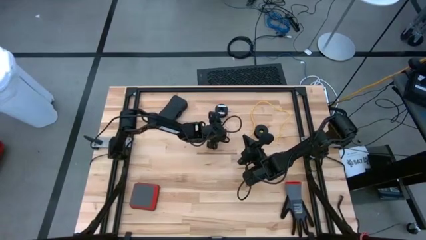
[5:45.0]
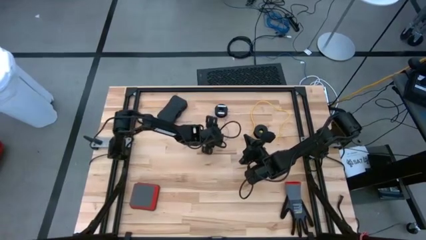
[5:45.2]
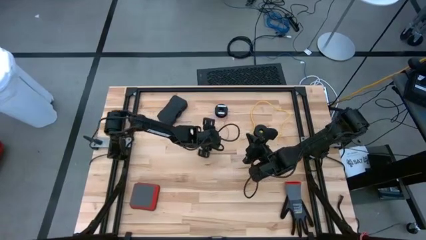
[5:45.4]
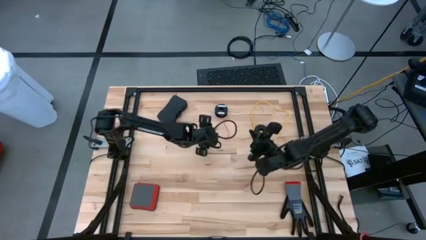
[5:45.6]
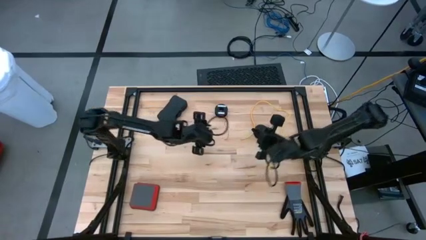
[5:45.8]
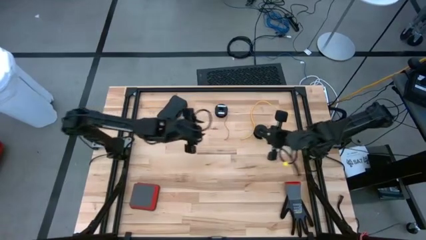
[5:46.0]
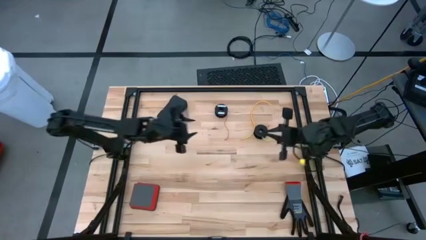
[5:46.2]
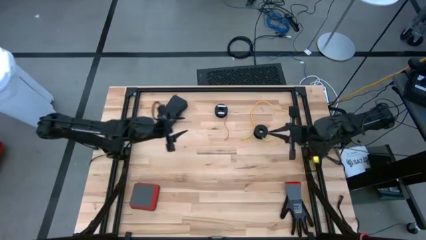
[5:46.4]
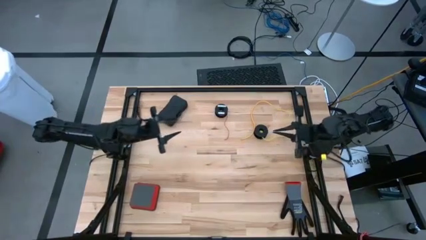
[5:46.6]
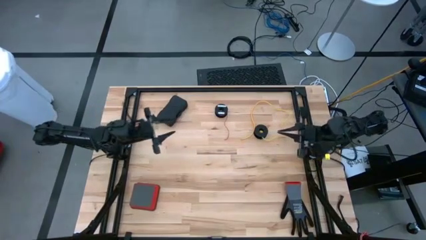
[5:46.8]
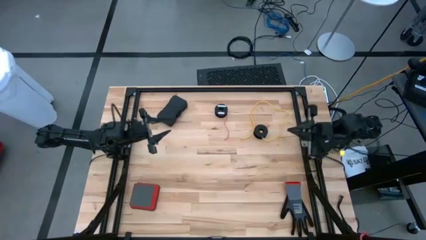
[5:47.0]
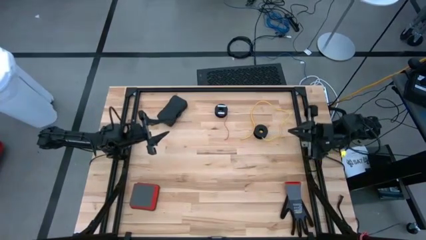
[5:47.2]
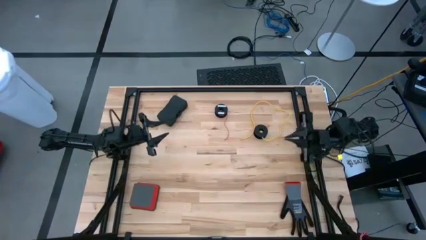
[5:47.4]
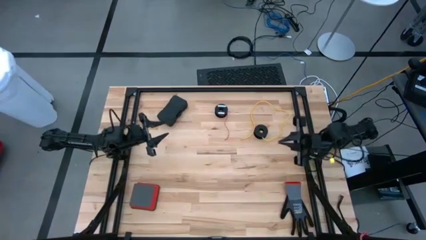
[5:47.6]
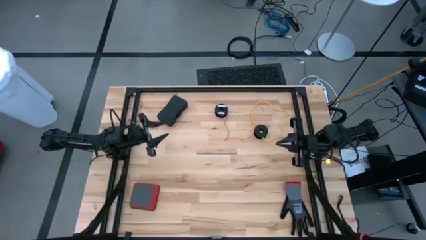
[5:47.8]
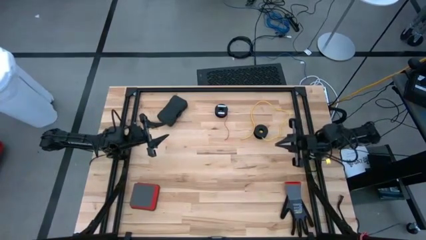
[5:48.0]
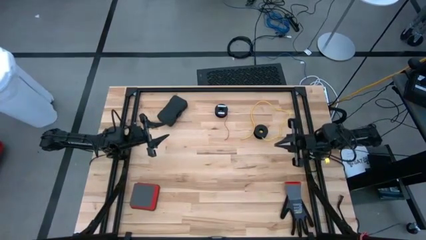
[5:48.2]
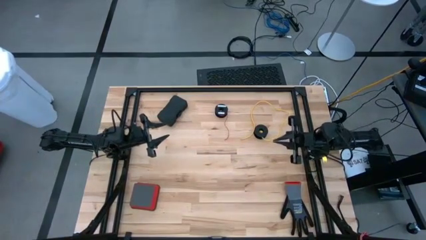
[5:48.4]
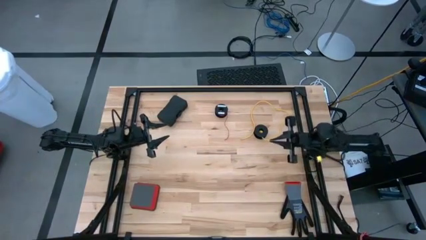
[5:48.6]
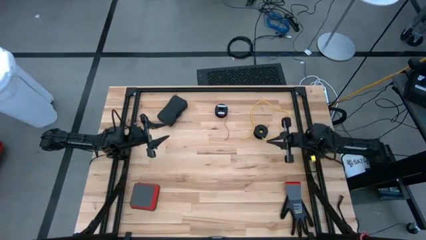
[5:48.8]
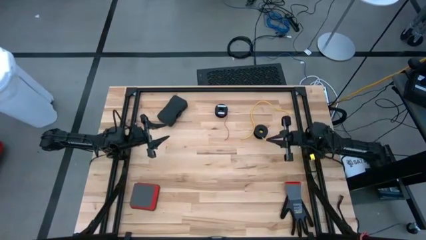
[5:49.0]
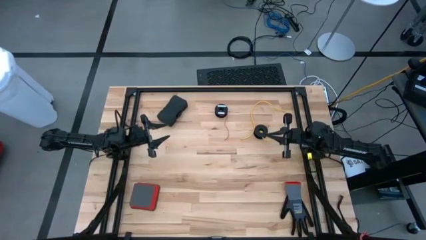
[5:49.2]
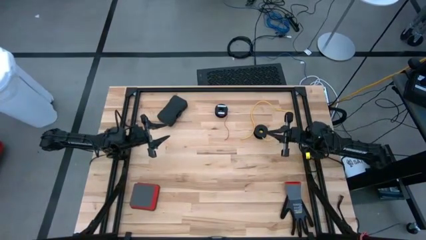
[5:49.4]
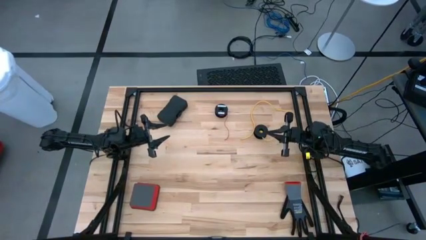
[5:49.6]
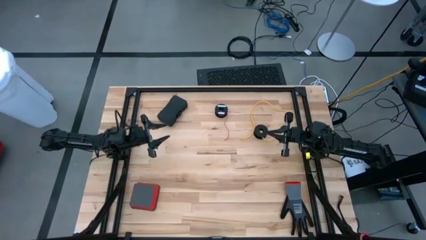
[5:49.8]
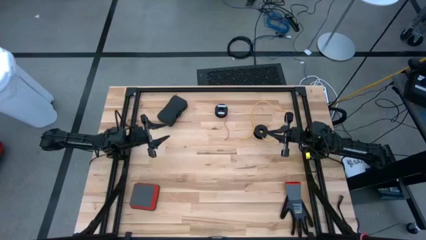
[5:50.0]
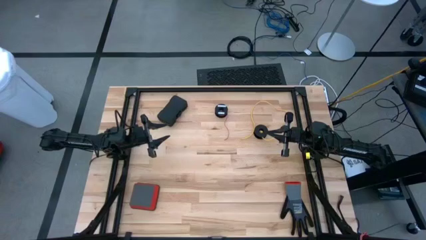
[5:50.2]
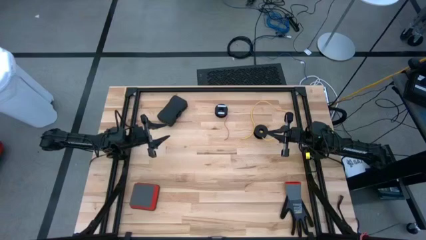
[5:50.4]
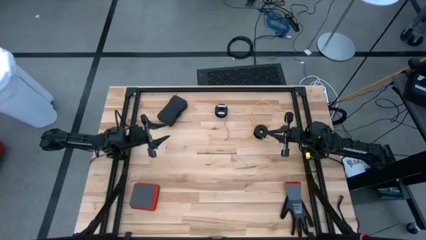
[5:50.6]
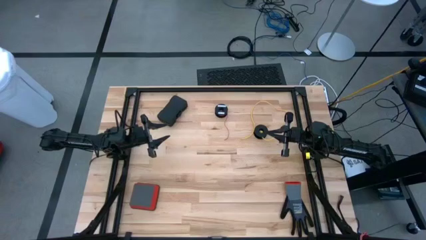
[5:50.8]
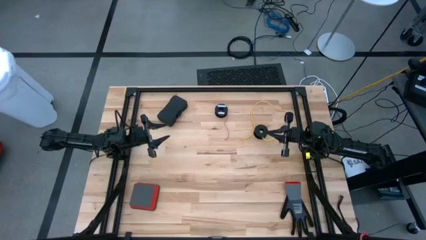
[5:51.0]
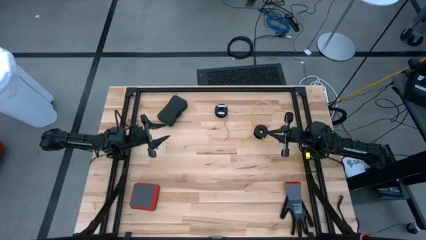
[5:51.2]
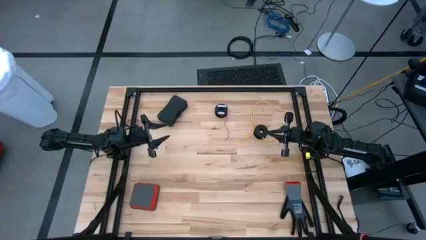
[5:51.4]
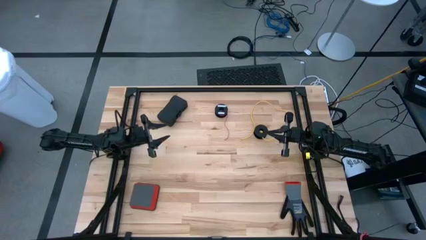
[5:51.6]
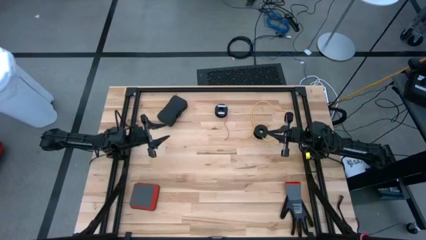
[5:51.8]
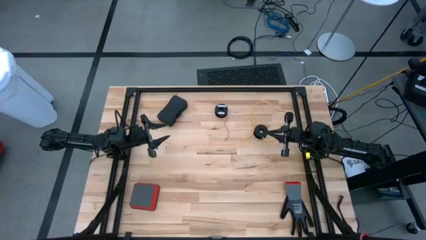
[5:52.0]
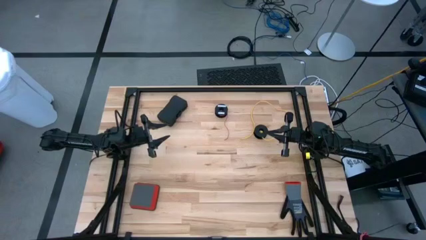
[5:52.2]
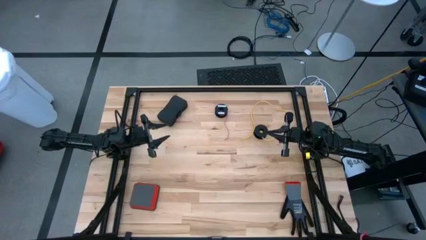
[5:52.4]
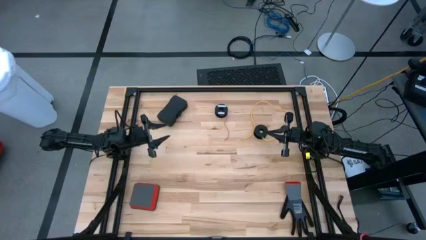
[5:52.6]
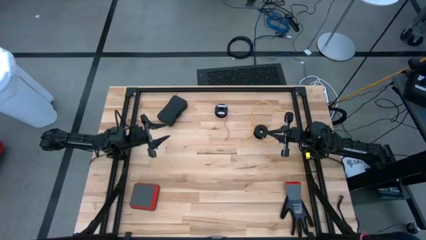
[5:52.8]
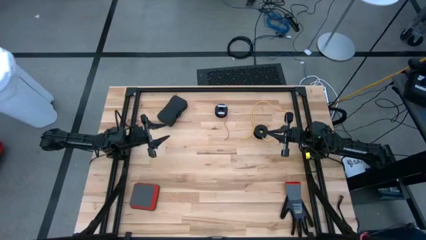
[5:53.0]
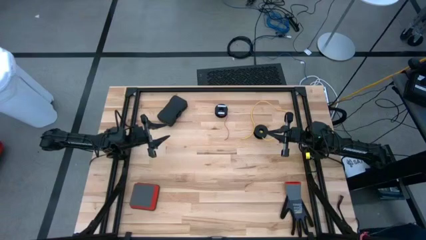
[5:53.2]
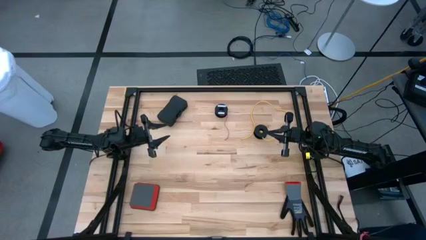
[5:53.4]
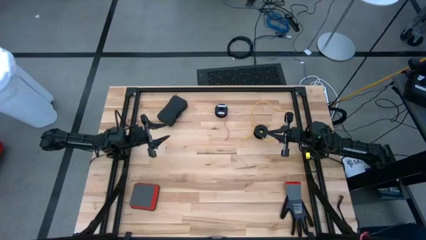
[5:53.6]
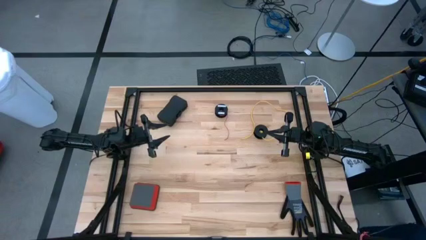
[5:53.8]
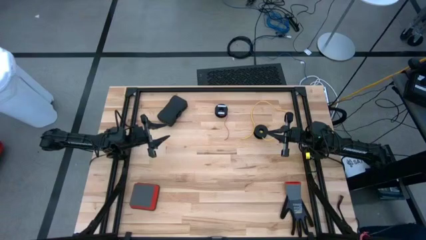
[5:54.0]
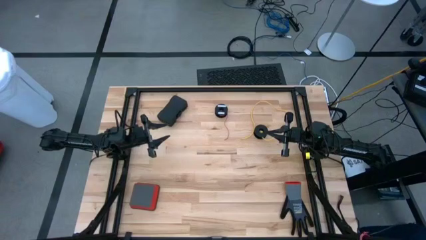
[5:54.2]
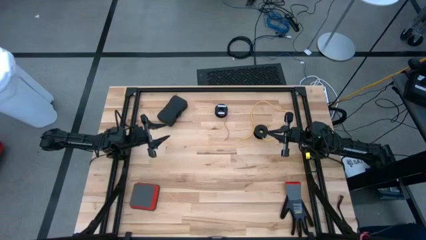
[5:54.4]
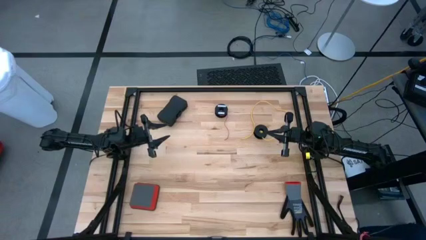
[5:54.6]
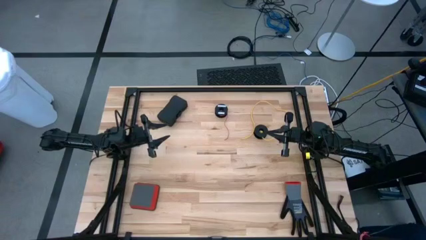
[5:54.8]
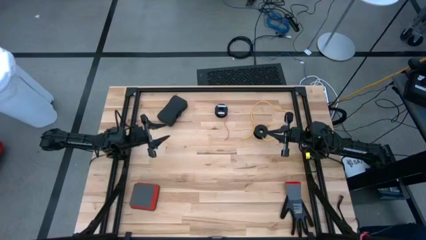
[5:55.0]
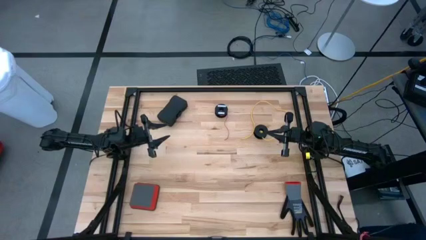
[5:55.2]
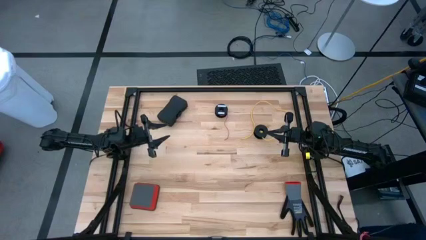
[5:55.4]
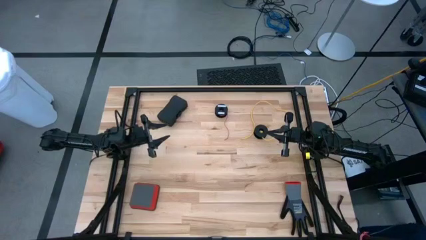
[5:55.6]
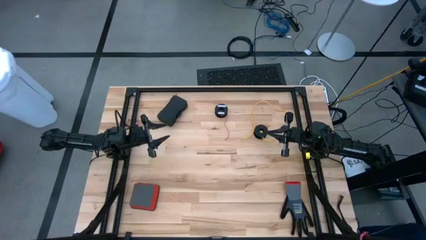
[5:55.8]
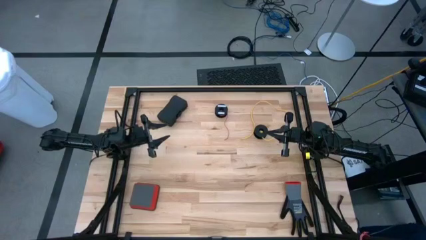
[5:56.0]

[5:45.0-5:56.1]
Task: Coil cords
Return to Home Position
